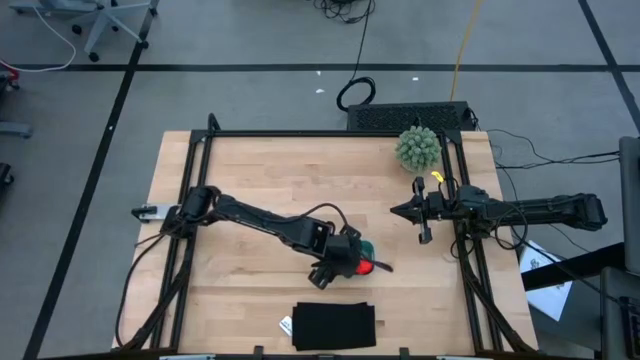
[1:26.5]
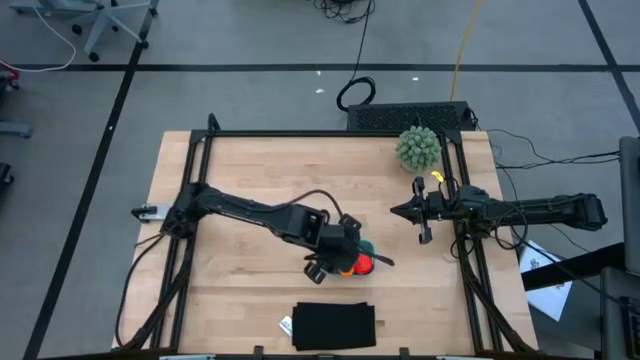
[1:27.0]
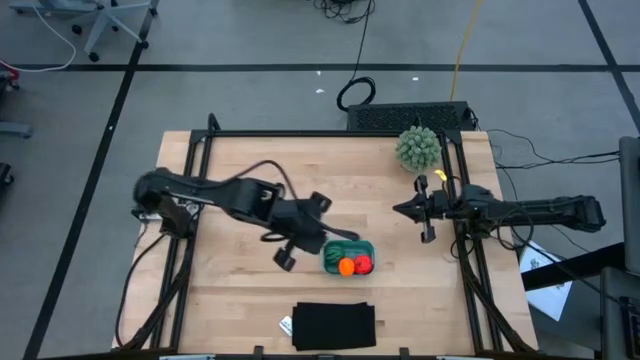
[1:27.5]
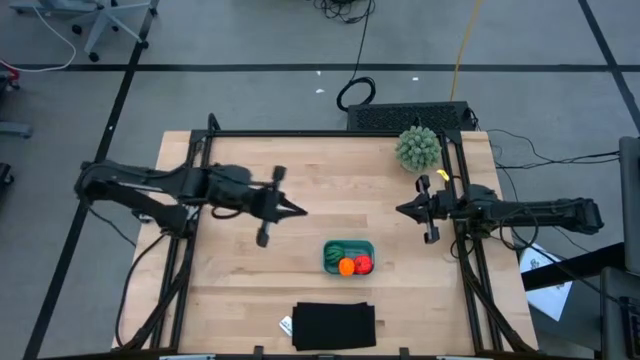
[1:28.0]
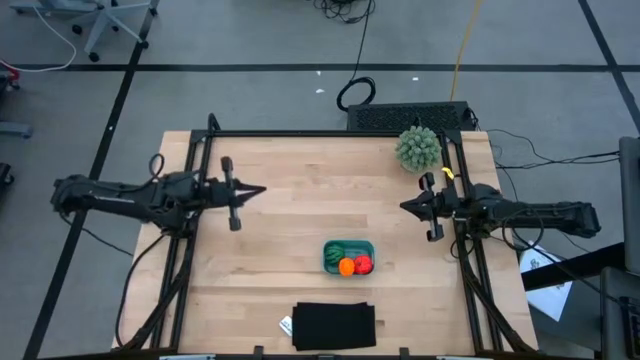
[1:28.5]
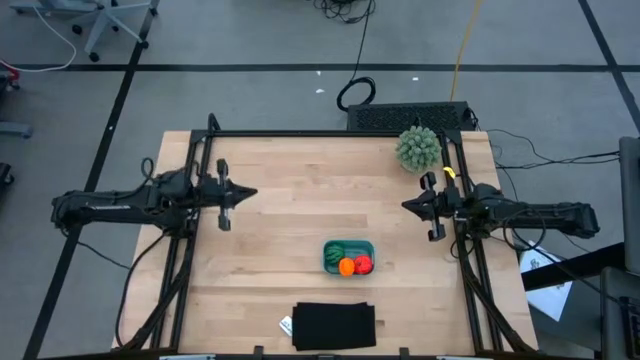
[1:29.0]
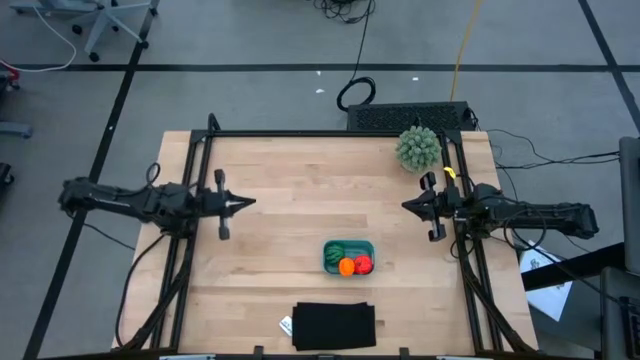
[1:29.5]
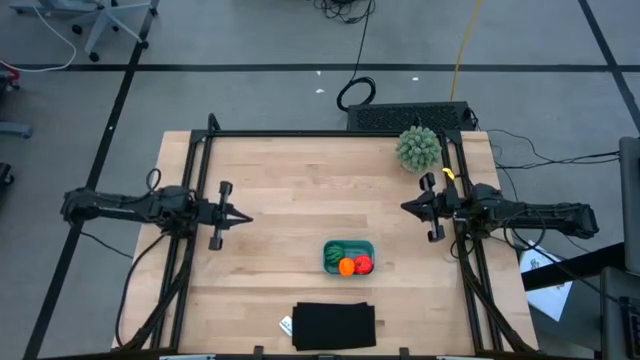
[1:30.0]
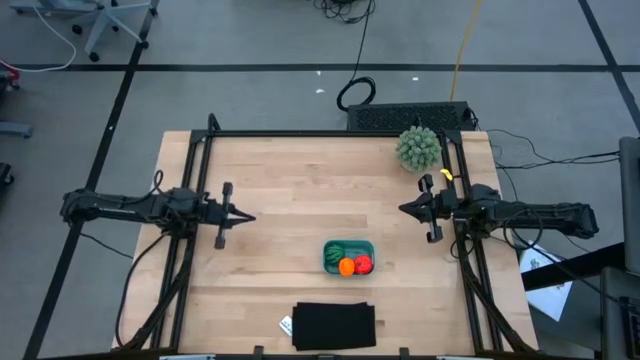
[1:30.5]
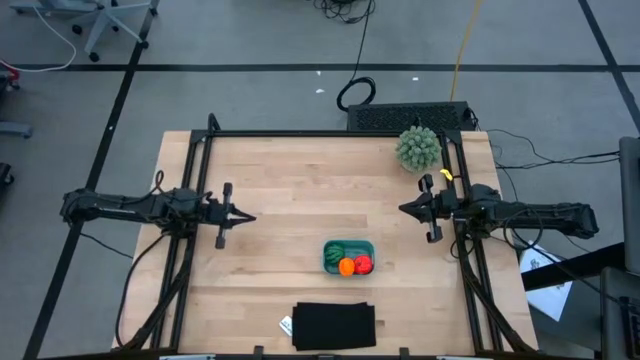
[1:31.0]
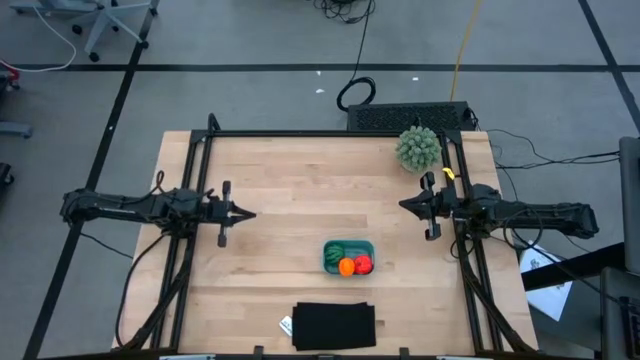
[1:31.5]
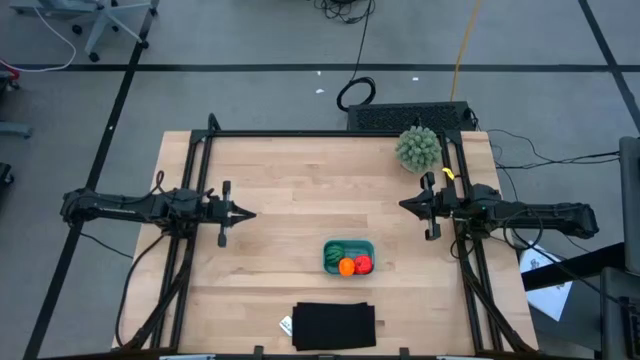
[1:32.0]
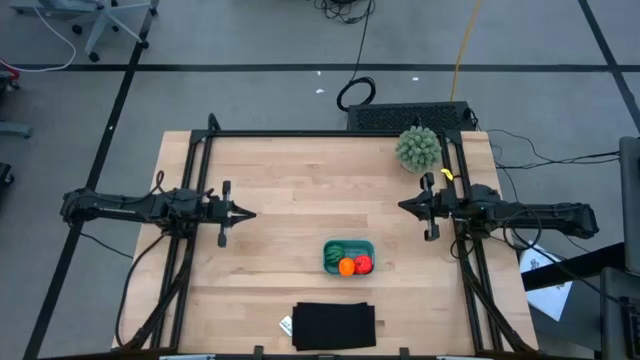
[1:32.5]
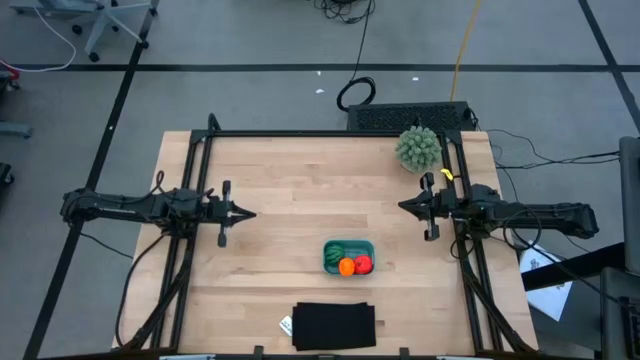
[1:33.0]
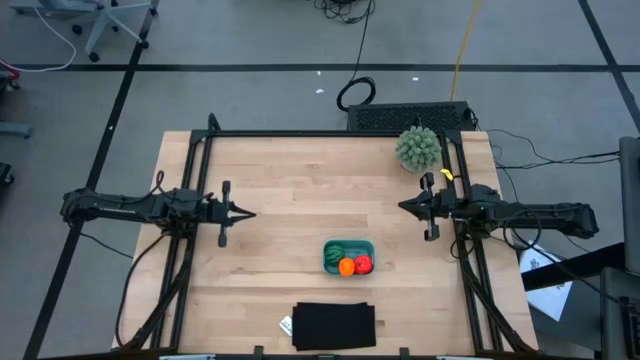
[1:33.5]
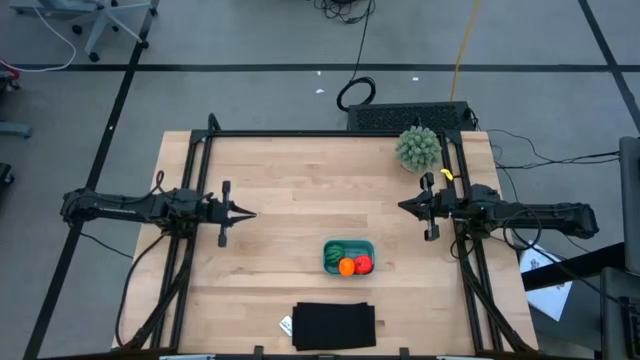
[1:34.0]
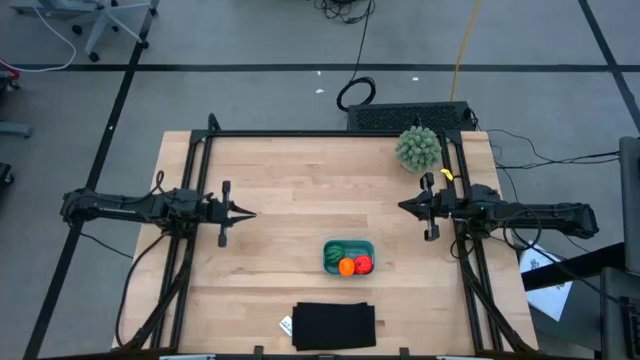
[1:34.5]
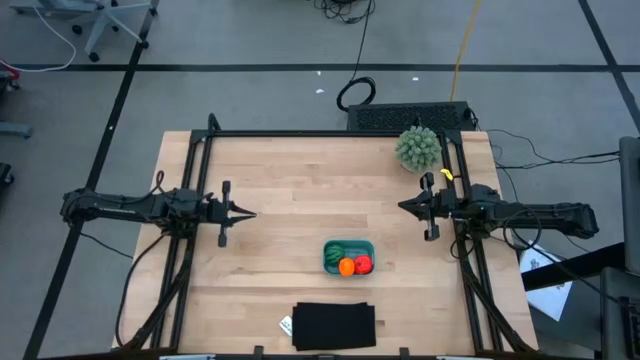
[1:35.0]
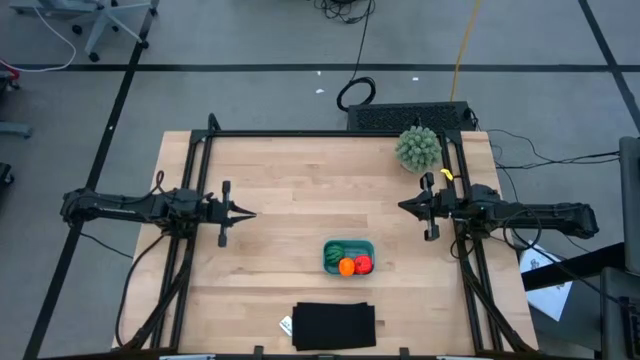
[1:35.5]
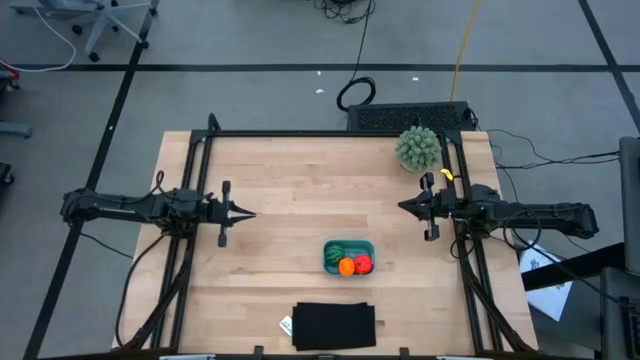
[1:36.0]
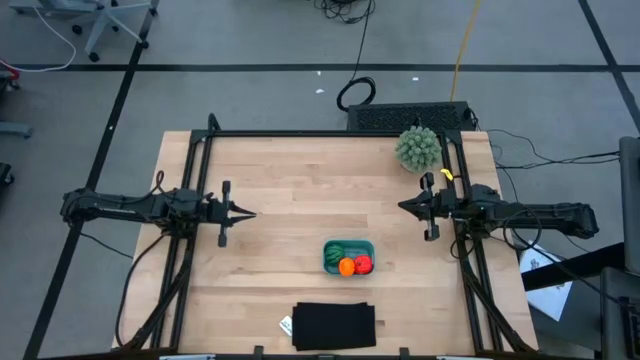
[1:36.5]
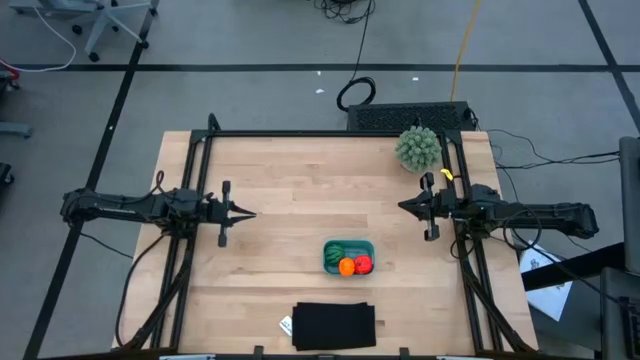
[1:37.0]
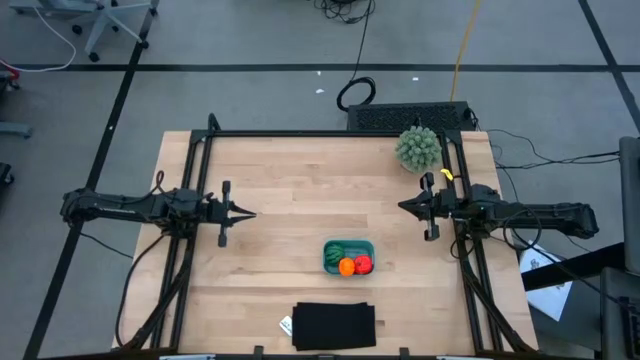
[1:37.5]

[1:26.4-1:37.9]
Task: Pick and placing Produce into tupperware
Return to Home Position
